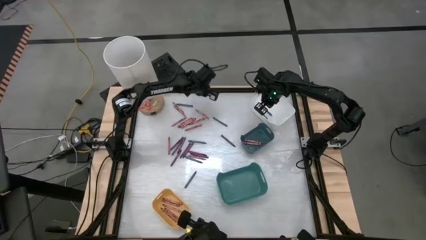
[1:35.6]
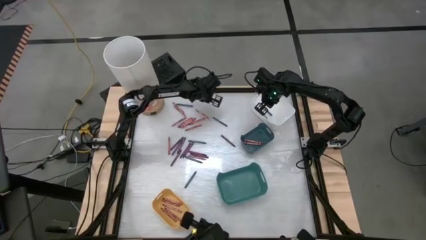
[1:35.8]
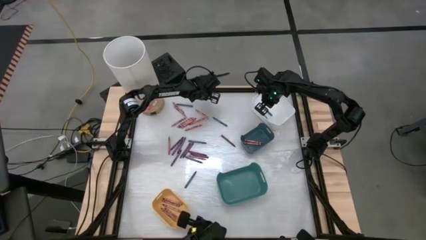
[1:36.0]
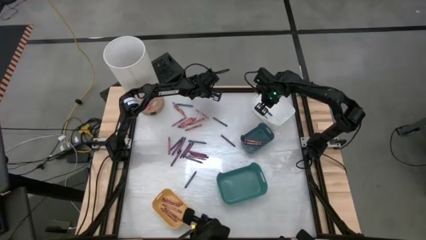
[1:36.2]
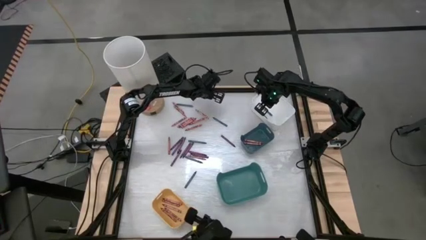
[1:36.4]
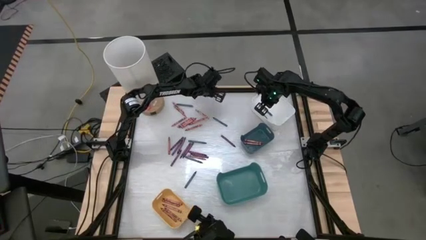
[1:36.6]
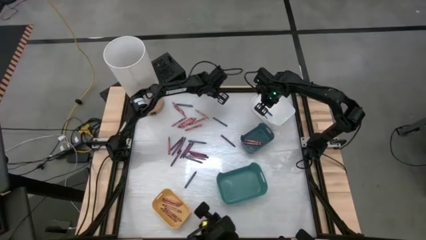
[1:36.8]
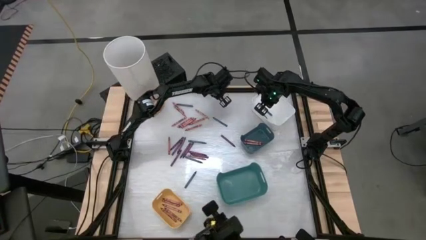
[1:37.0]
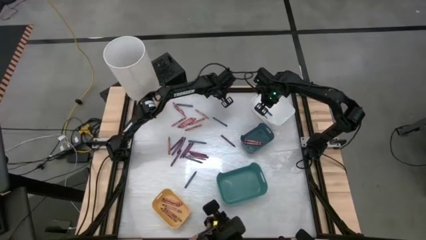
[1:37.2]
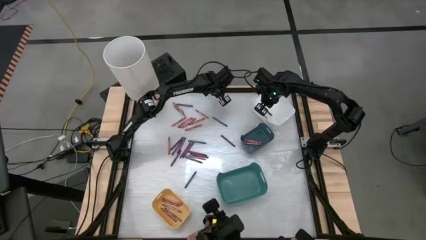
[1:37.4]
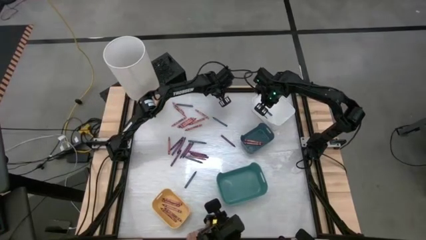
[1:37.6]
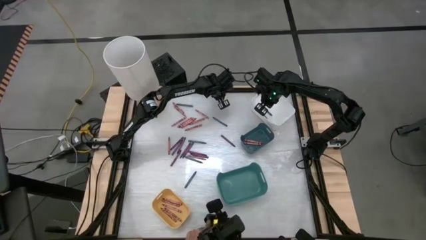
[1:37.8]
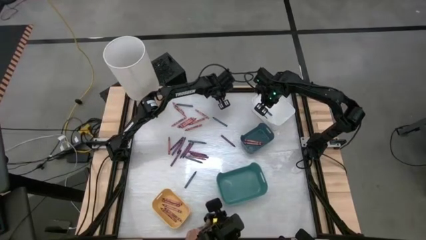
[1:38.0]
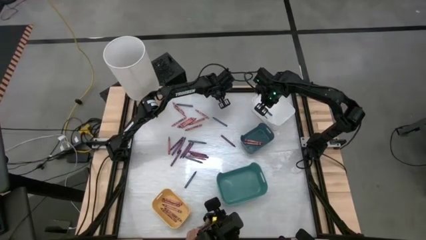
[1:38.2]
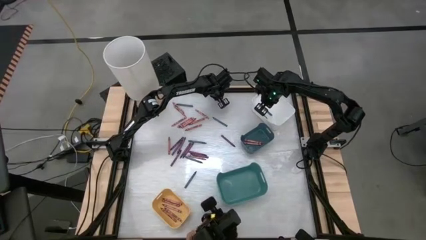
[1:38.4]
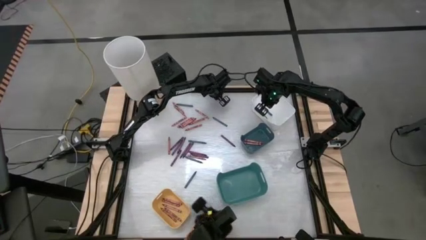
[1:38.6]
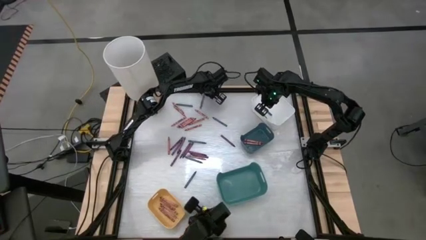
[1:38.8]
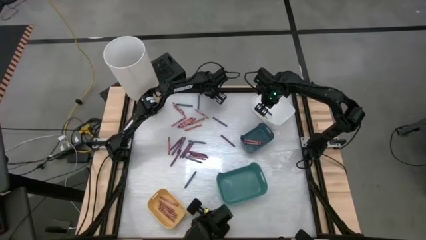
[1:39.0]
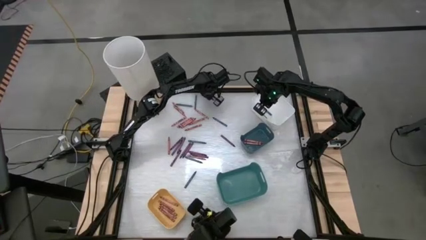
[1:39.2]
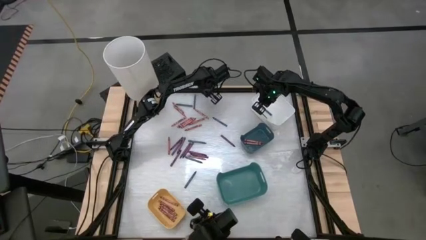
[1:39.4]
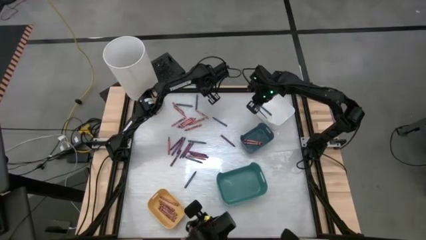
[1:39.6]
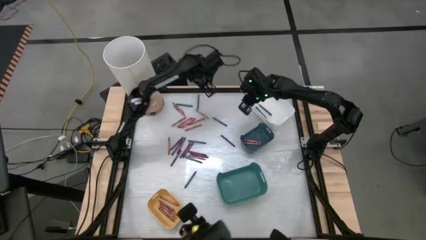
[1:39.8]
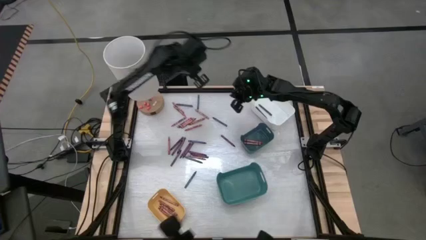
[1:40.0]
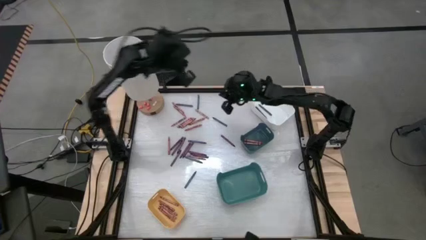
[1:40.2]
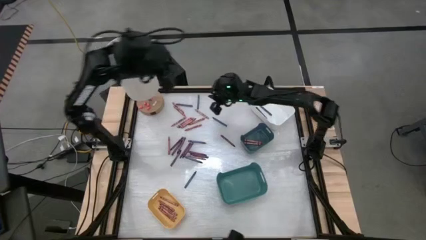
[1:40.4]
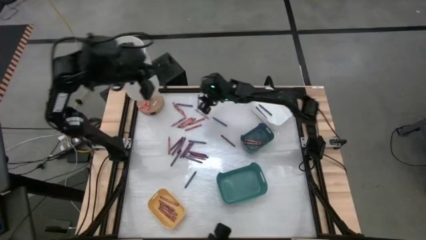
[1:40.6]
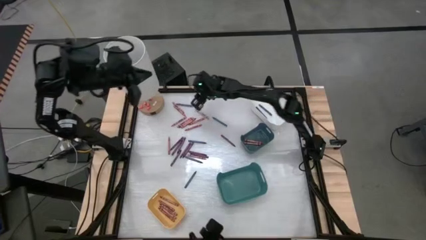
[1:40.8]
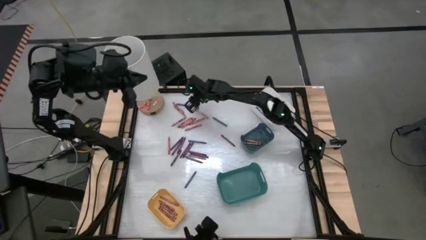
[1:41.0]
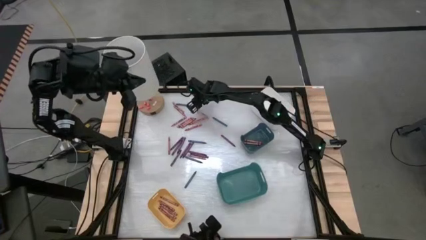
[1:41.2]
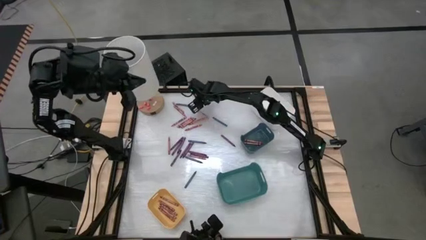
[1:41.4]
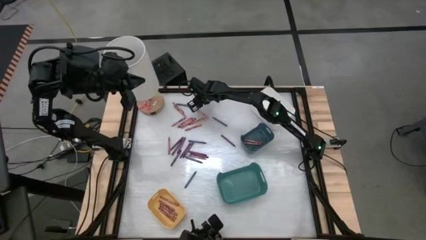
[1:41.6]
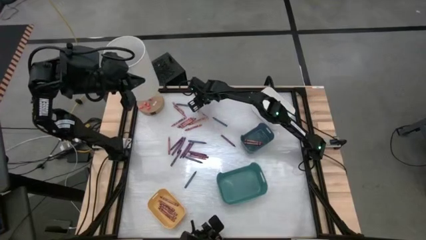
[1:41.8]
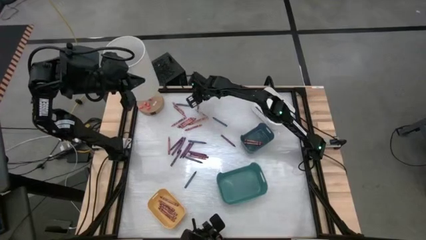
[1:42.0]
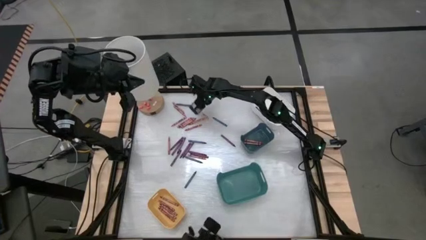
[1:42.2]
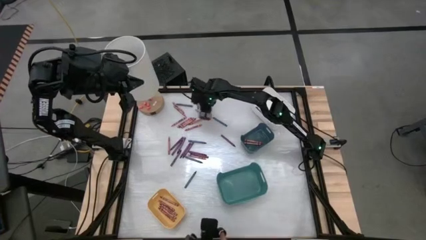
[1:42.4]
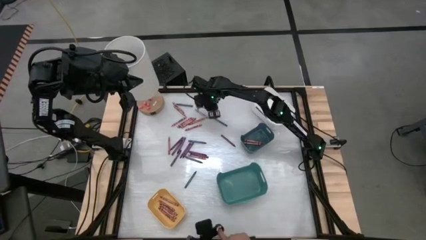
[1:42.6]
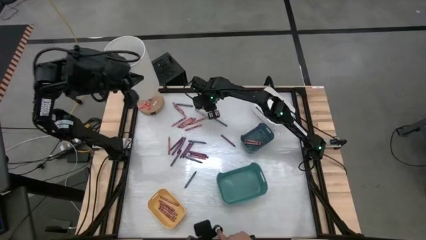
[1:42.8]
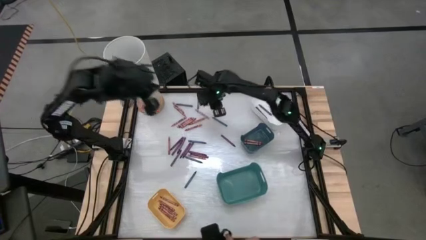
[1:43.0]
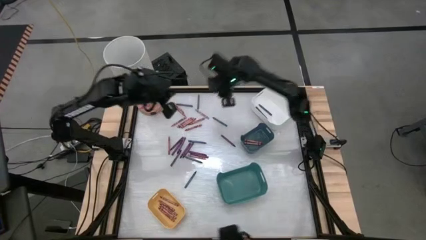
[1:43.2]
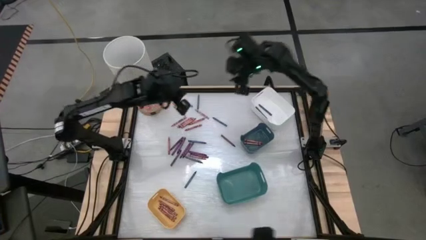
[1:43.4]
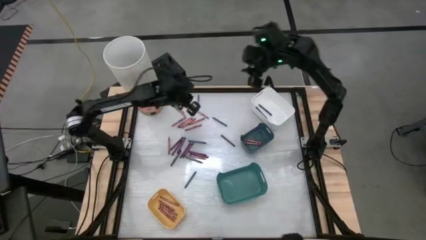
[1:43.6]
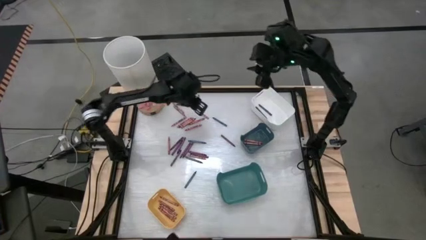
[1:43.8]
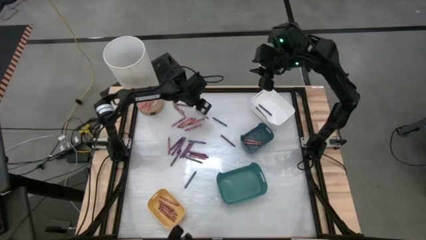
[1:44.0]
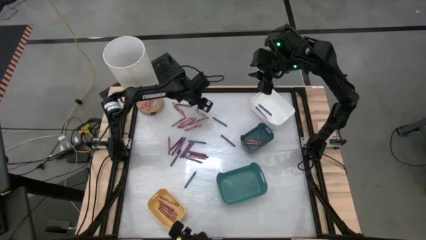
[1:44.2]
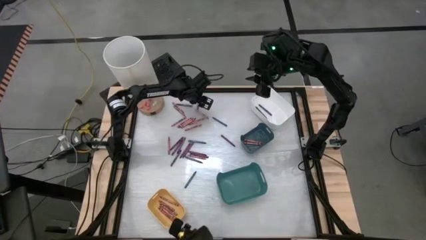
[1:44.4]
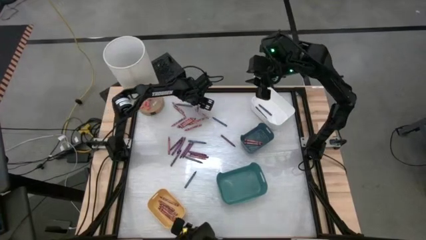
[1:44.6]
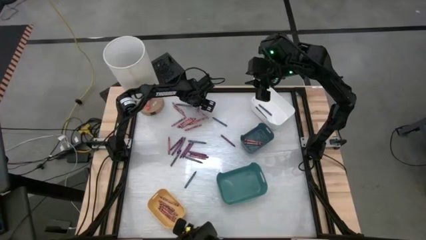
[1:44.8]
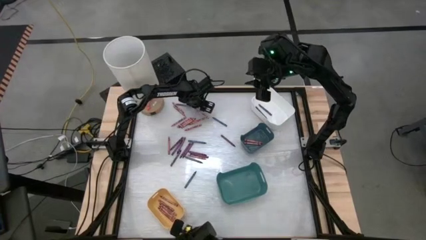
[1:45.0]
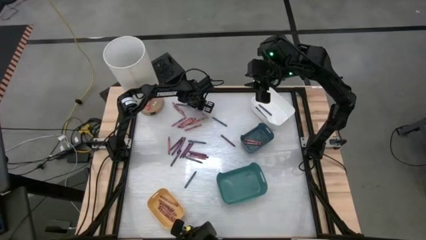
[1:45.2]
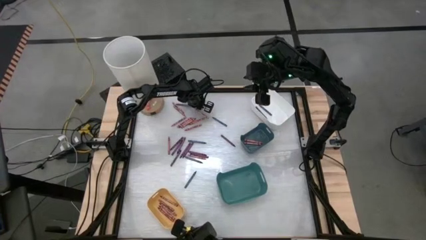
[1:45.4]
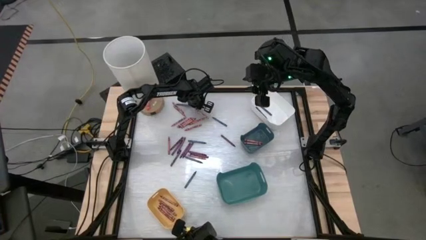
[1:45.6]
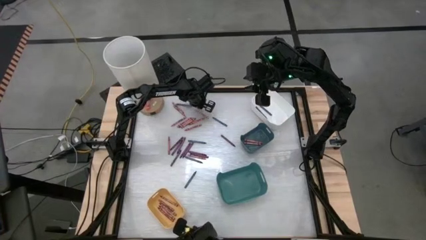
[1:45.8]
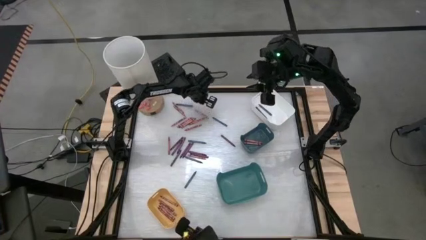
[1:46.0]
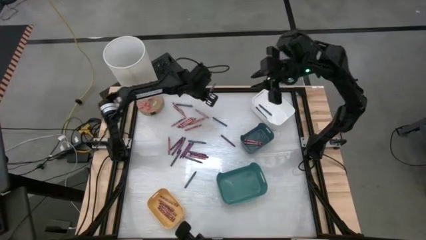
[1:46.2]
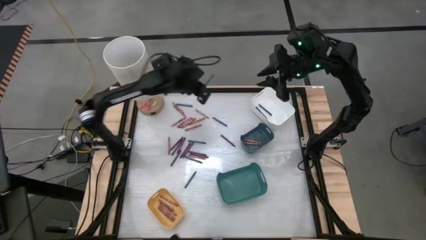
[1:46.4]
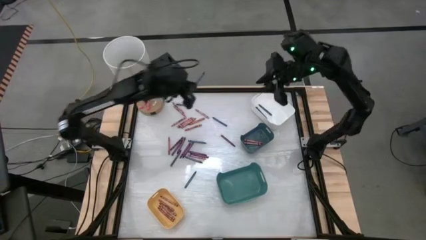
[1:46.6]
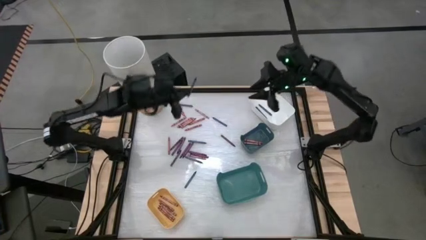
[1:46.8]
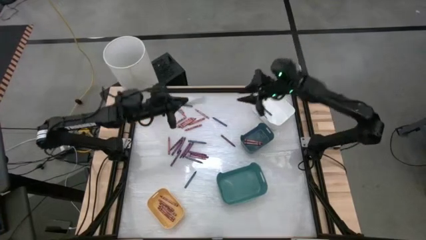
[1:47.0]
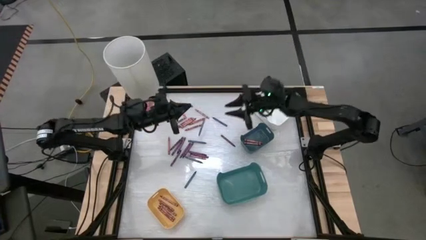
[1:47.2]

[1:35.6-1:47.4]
Task: Sort crayons
Put the blue crayon into the white bin

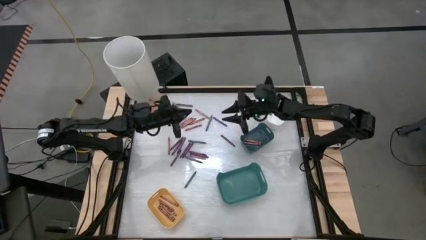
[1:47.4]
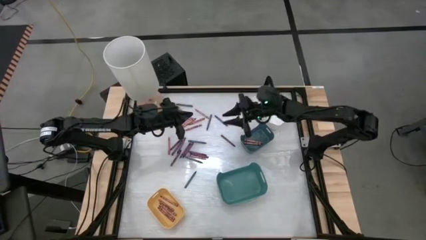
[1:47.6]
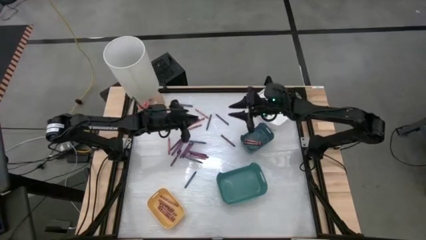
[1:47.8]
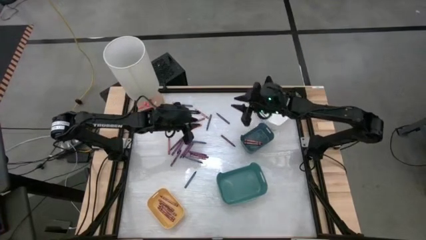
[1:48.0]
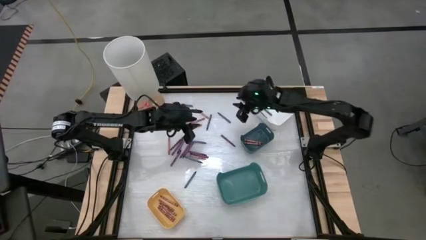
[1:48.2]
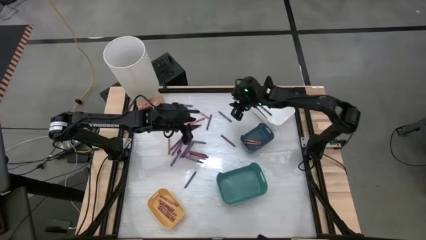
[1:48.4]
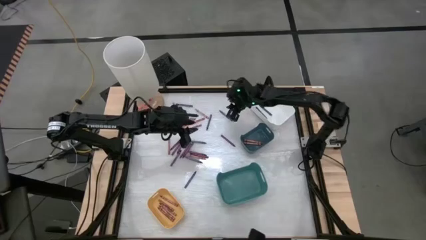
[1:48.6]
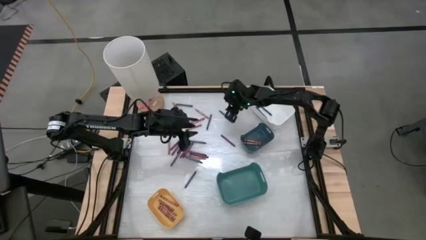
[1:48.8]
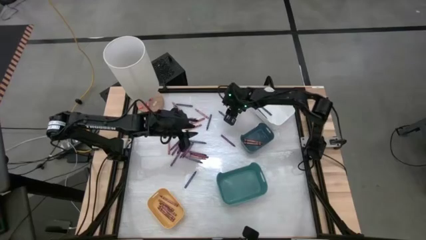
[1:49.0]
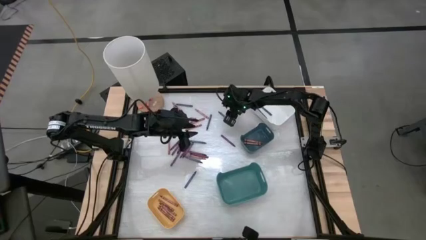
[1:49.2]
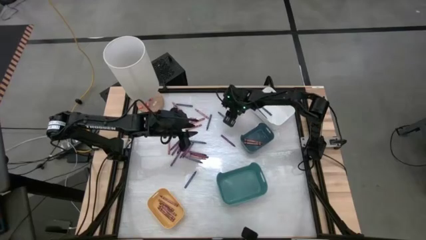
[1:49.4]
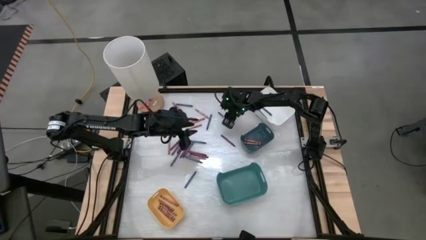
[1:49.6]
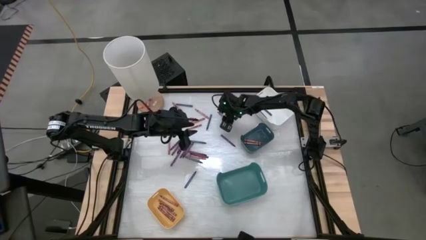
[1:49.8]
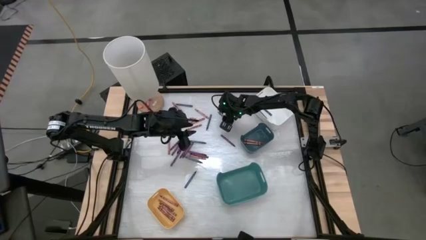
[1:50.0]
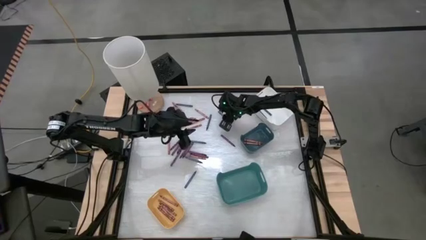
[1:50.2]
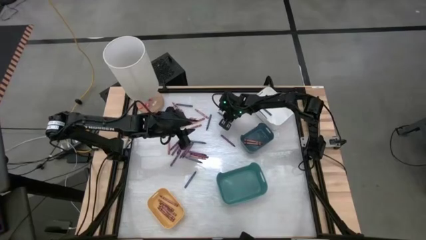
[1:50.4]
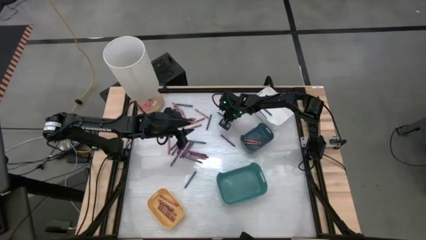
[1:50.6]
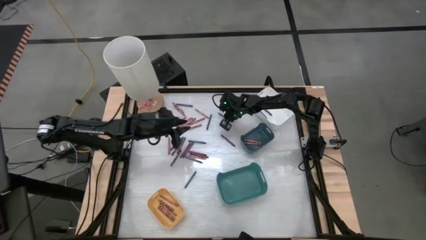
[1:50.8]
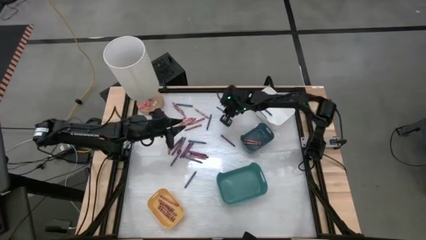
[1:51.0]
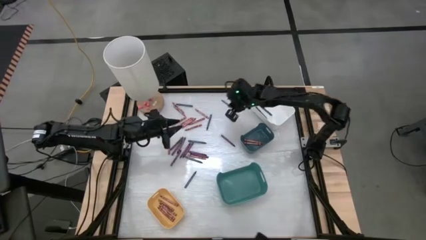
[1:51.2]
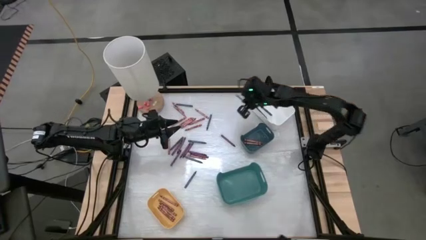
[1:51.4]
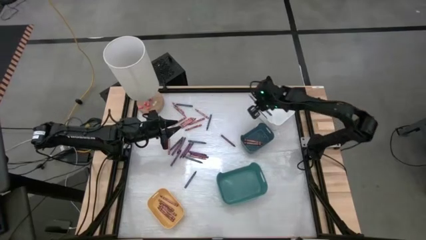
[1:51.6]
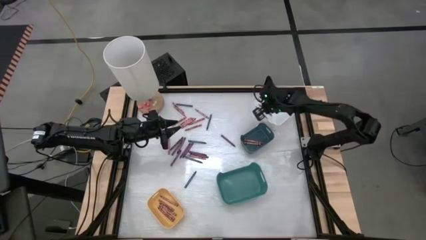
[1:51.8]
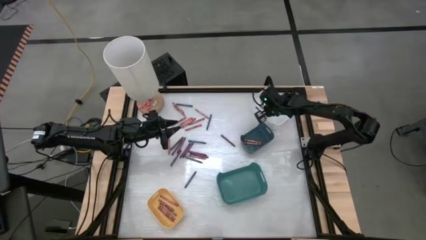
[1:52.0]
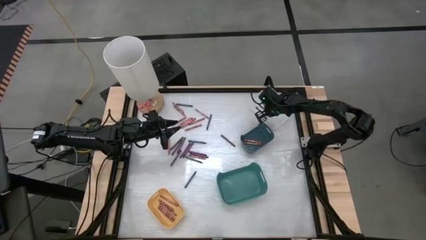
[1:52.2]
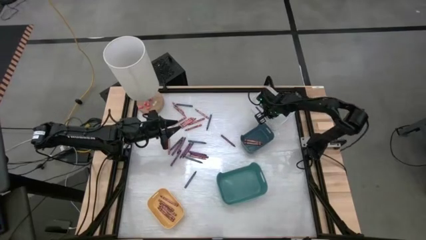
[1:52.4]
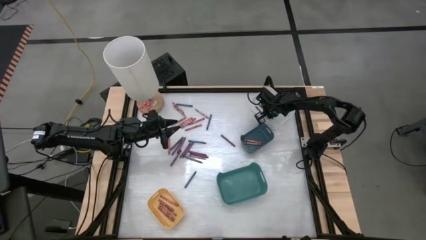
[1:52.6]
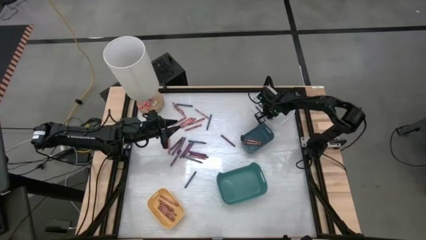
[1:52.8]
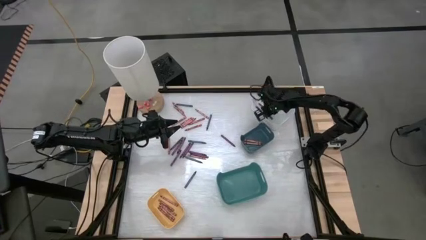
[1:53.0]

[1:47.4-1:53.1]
Put the blue crayon into the white bin
